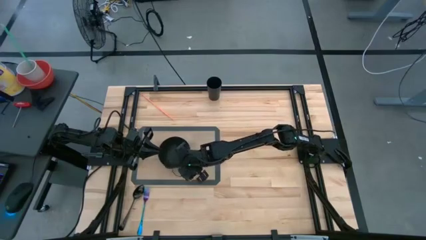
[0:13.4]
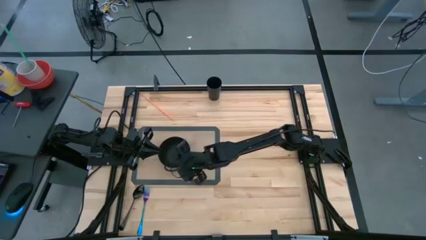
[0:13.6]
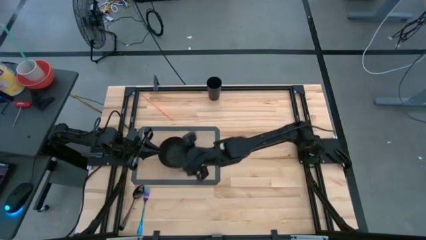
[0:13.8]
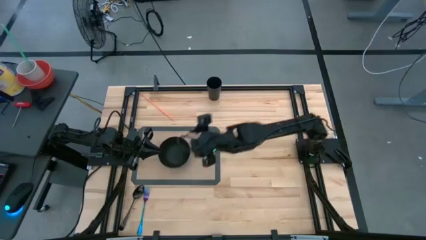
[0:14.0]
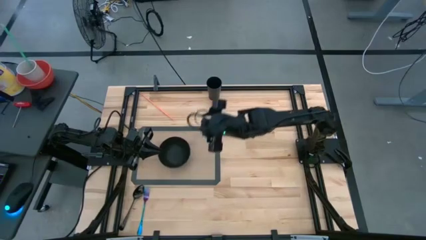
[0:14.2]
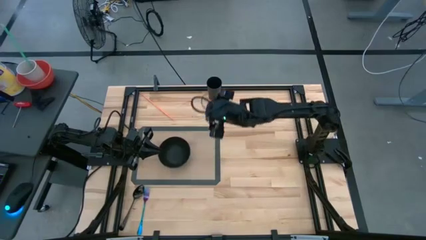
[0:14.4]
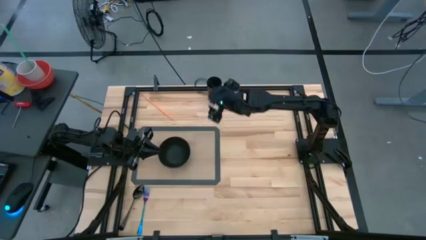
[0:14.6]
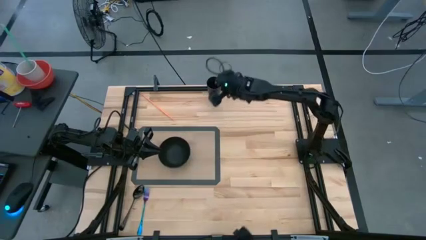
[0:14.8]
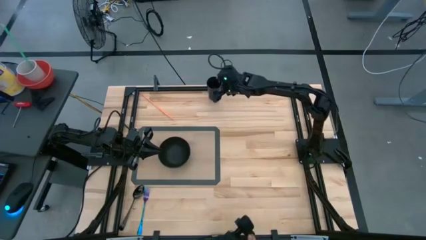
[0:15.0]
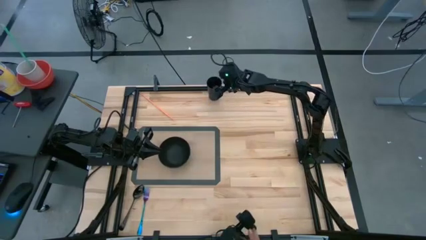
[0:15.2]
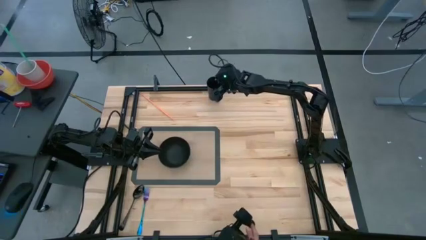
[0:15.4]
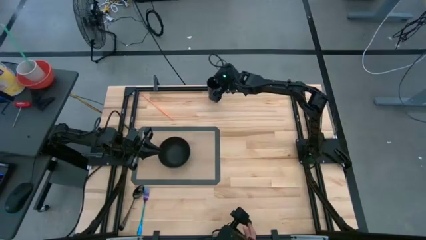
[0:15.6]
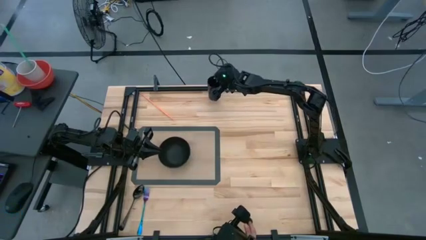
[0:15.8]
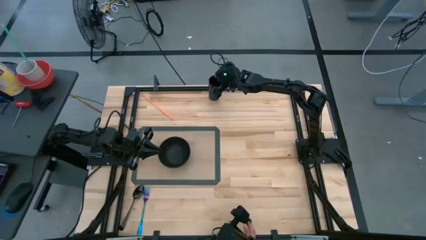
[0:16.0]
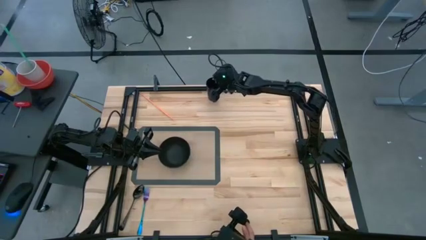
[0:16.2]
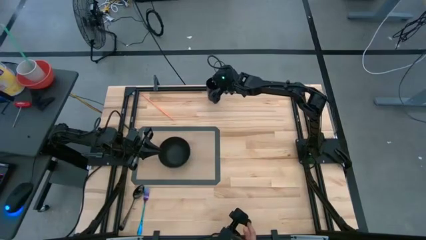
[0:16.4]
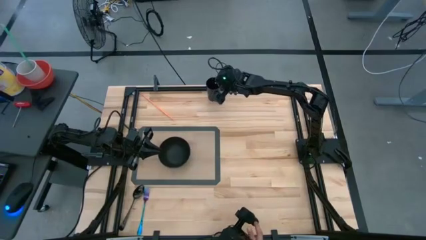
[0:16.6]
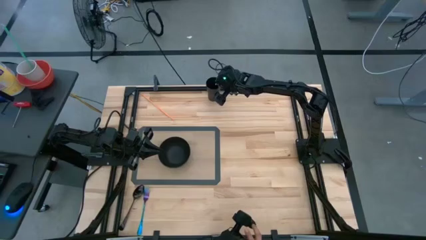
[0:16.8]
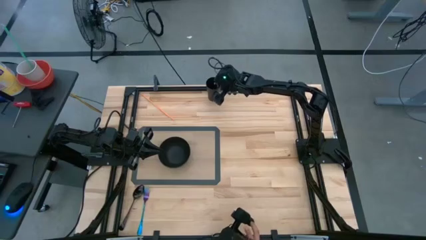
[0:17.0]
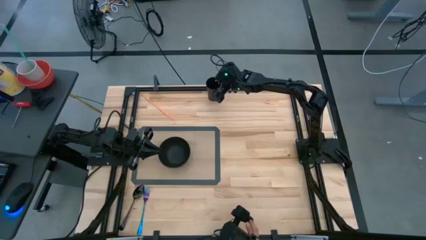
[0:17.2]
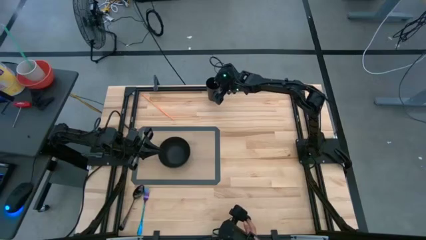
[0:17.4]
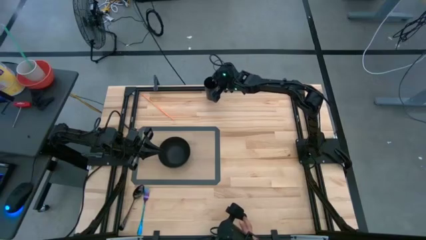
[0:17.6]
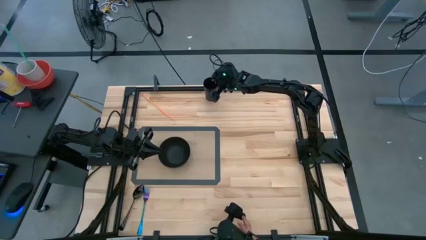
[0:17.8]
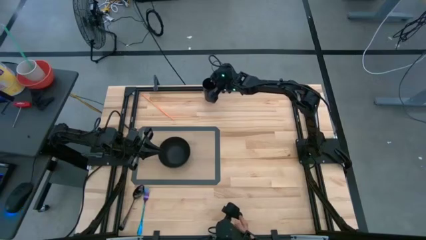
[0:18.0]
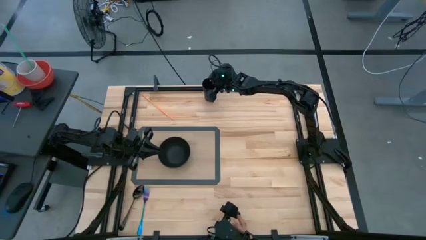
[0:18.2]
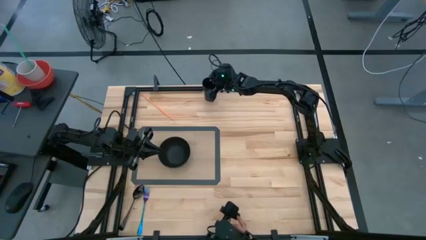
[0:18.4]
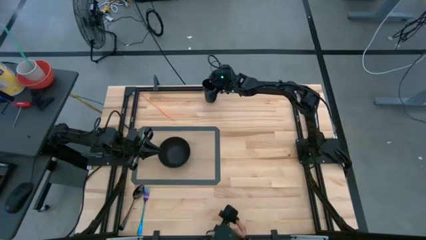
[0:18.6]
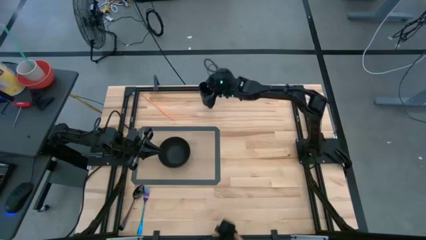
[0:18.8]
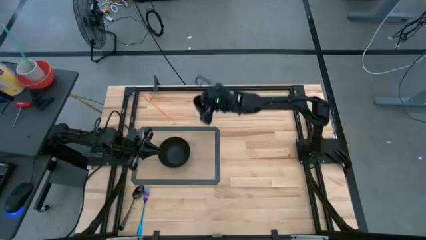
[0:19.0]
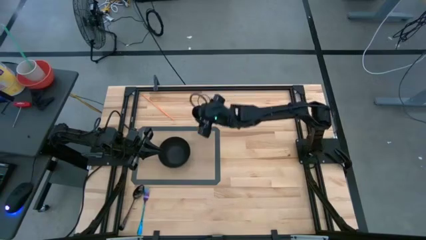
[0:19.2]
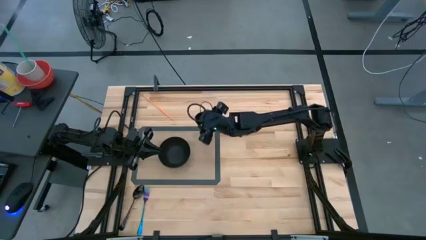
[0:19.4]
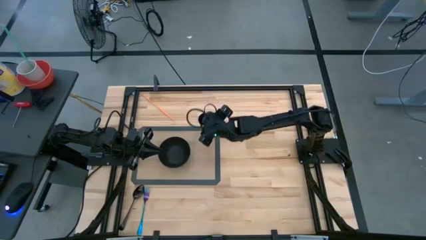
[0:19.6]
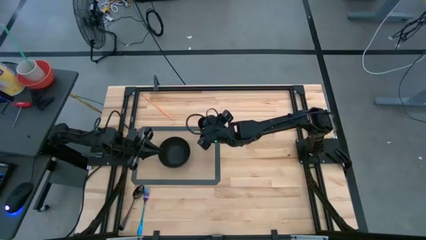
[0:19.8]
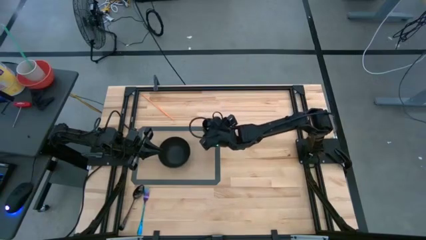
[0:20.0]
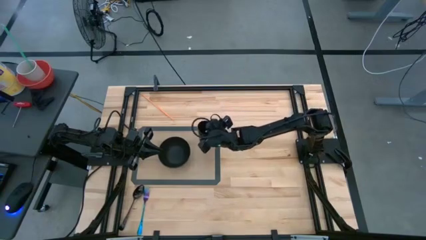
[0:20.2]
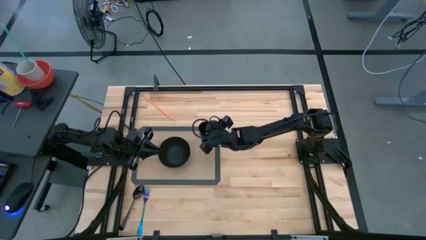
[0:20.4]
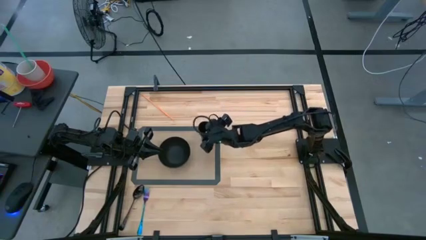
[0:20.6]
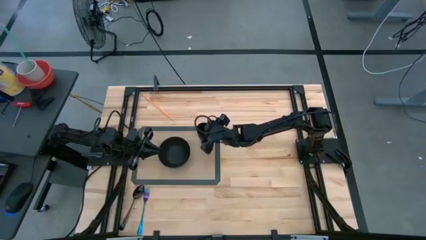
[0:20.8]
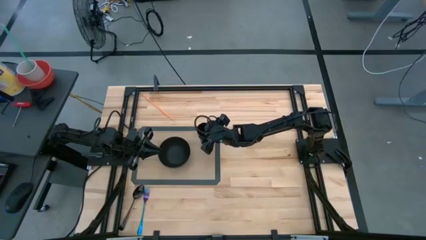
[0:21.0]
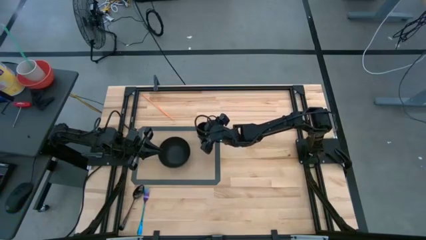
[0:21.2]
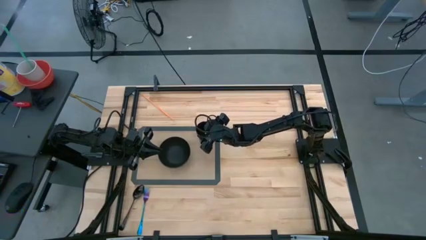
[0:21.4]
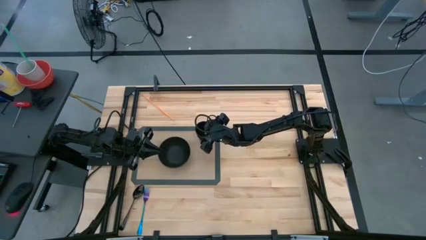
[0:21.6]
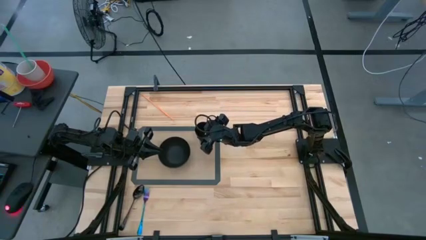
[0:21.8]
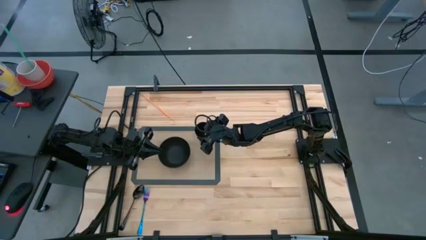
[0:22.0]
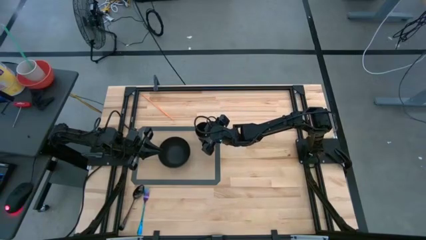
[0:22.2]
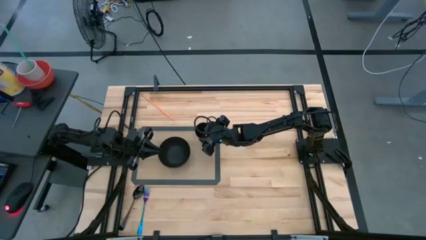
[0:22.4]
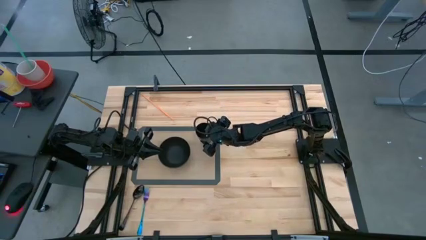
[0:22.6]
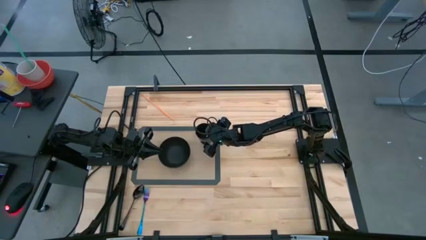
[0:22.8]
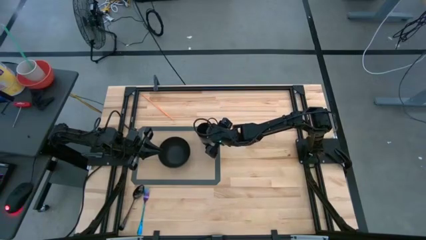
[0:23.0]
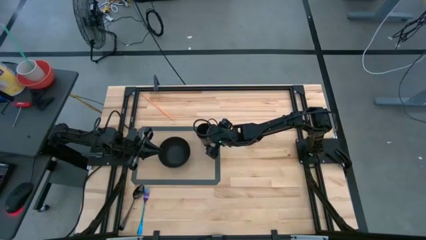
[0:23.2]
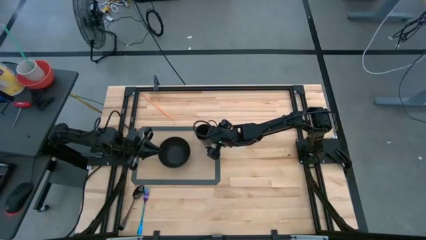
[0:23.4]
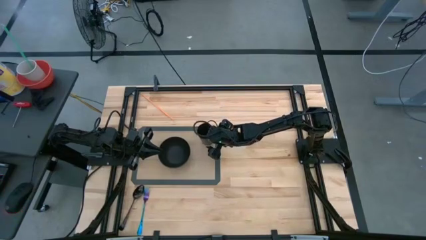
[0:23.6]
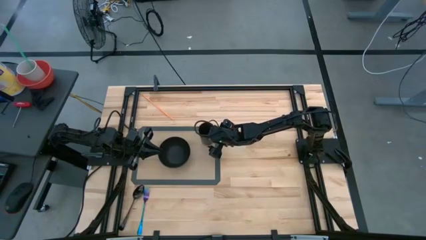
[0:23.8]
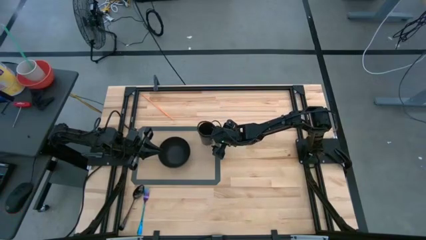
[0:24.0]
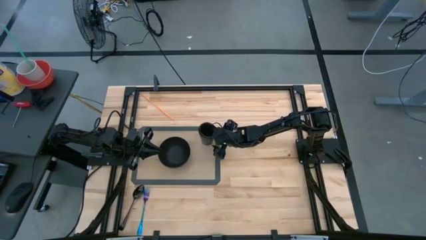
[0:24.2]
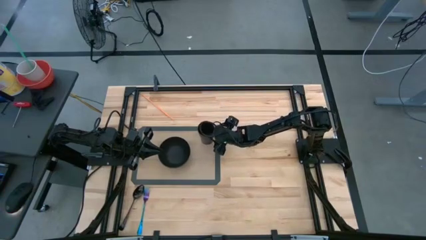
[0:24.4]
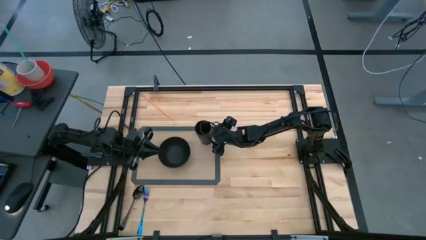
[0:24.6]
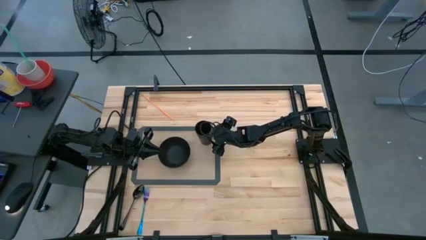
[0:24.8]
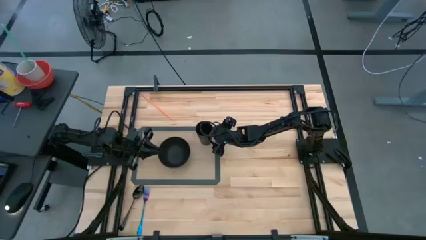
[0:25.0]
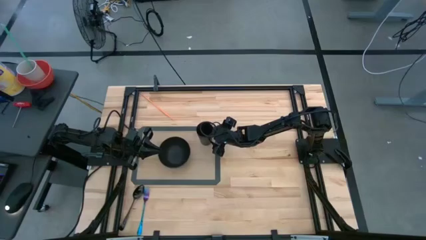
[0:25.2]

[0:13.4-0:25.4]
Task: Pick & Place Utensil
Put the black cup on the top right side of the transparent table mat

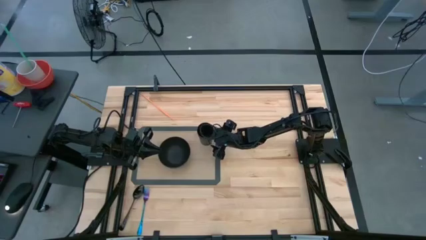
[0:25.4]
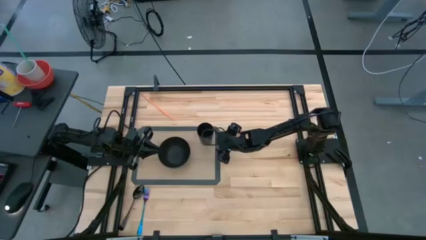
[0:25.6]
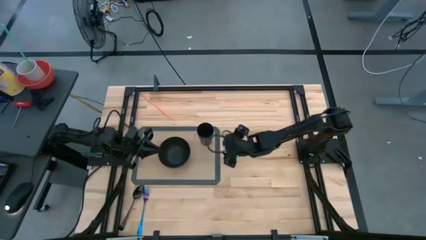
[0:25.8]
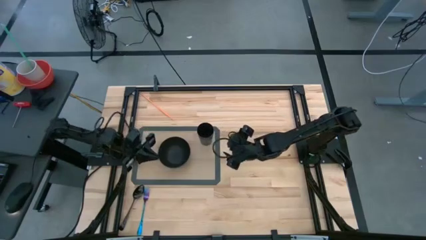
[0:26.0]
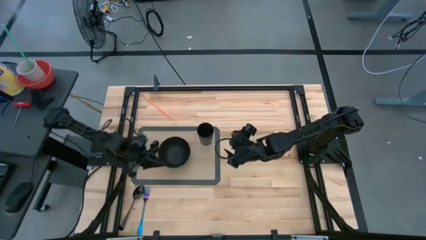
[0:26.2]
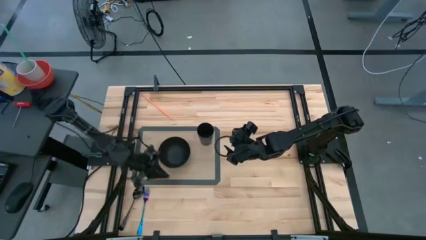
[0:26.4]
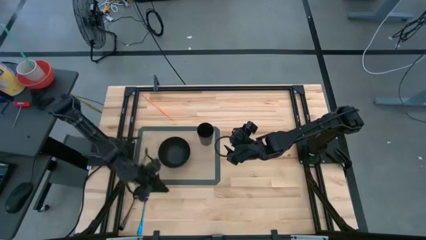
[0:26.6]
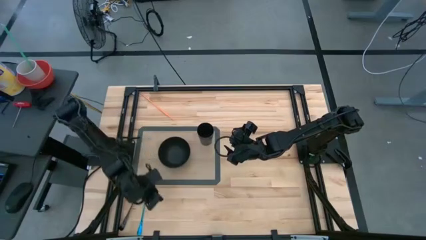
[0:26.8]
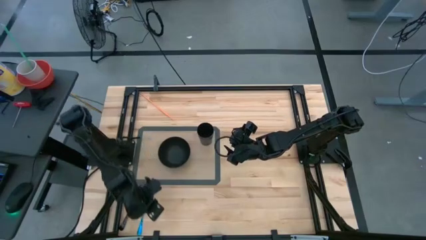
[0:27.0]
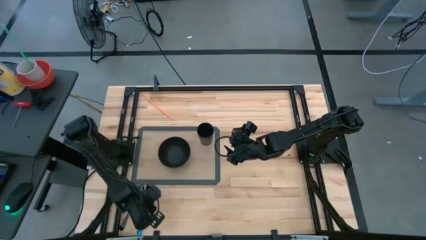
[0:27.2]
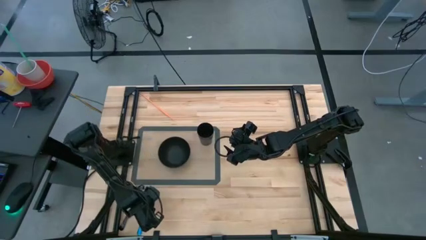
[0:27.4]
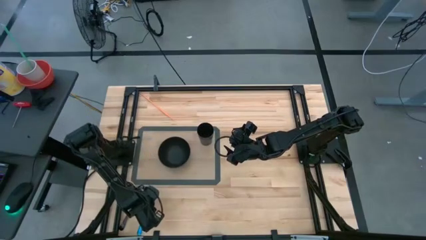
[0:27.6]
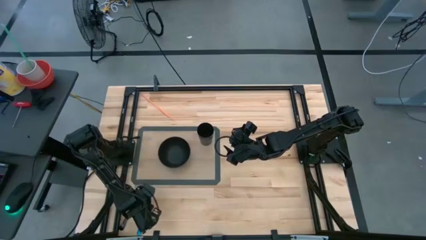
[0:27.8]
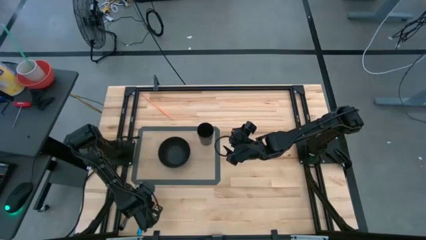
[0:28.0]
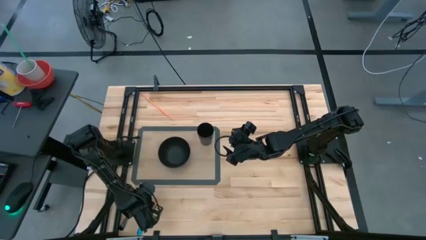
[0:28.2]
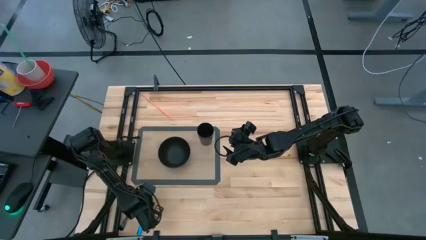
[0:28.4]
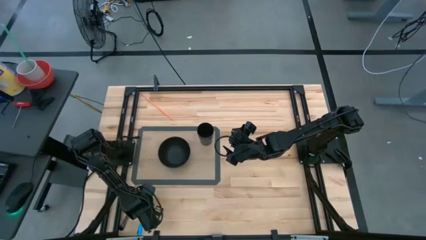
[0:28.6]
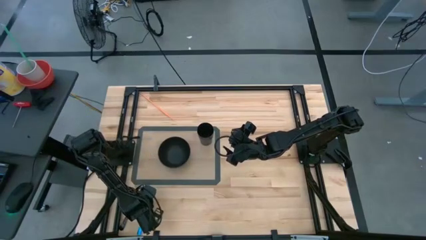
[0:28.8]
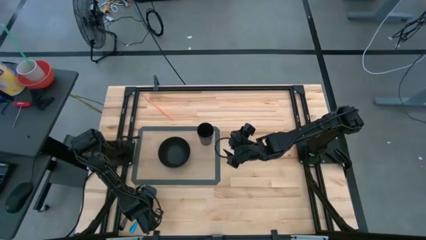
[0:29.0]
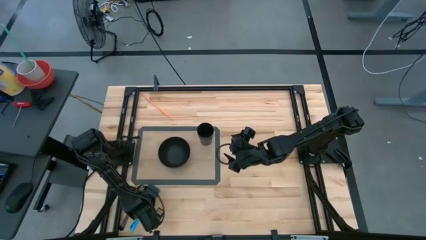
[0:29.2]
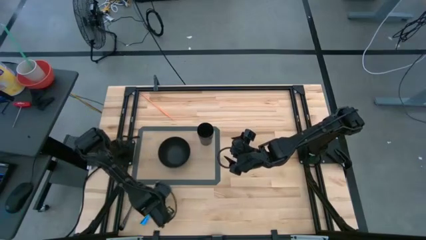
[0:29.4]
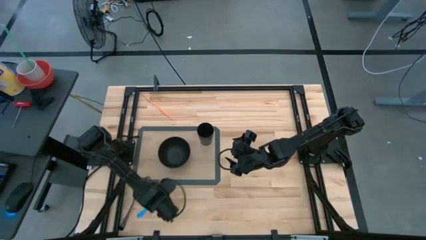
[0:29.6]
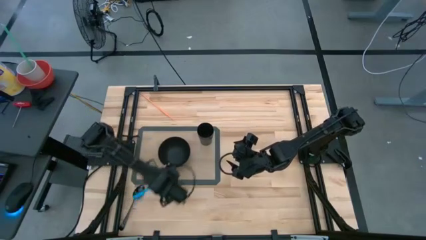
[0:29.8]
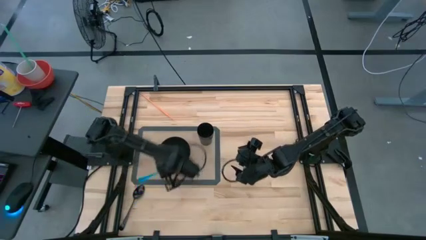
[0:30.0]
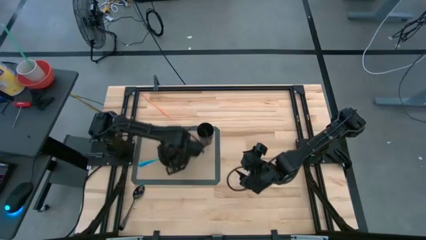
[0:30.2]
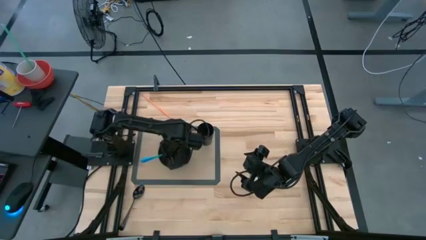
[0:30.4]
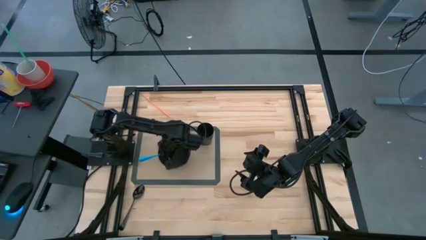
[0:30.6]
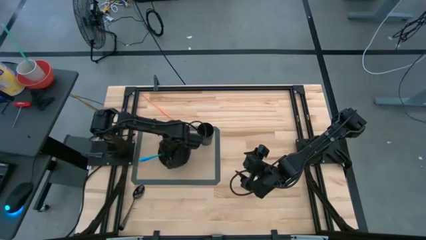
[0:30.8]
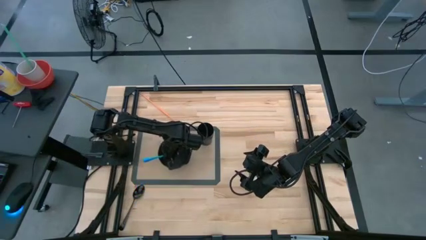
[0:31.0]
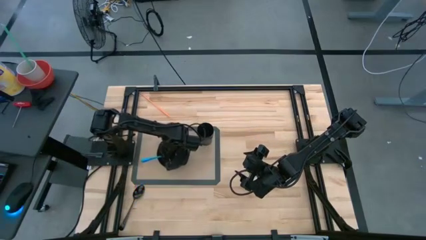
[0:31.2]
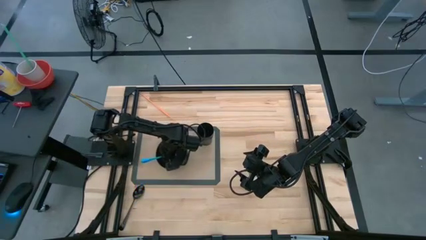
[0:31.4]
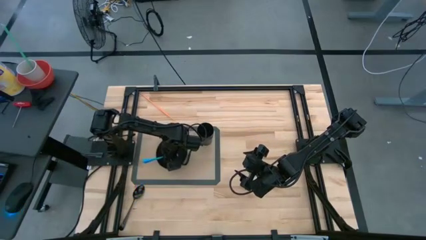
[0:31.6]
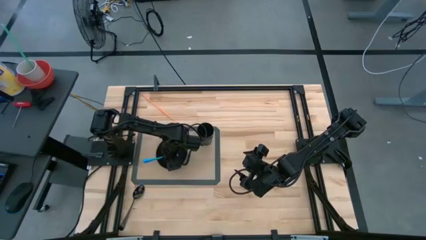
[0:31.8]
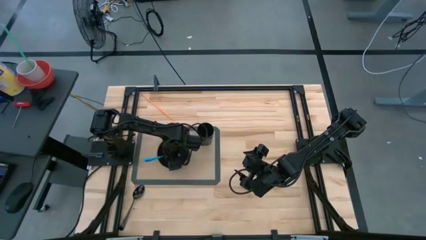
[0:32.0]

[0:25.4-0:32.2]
Put the blue fork into the black bowl on the transparent table mat
